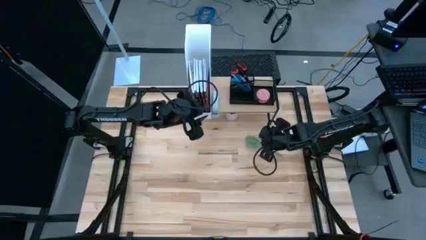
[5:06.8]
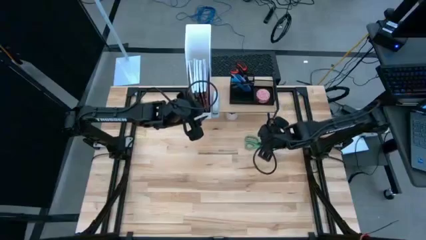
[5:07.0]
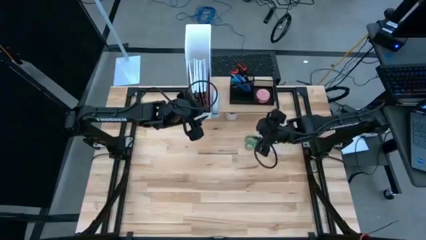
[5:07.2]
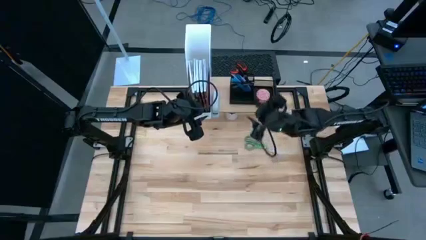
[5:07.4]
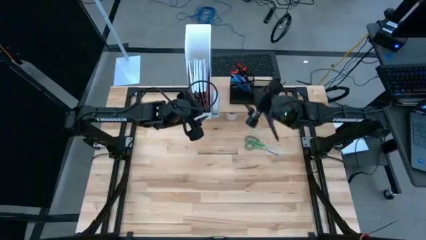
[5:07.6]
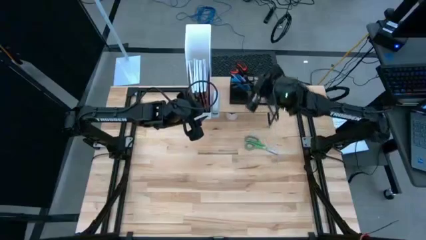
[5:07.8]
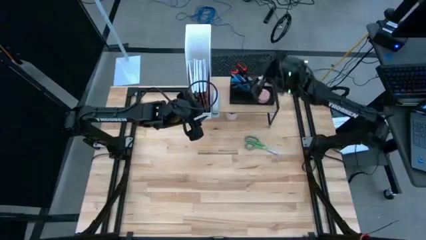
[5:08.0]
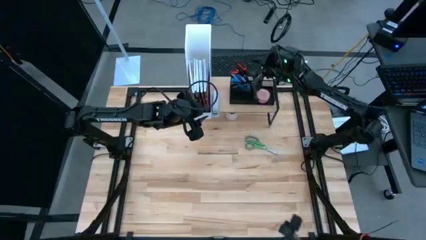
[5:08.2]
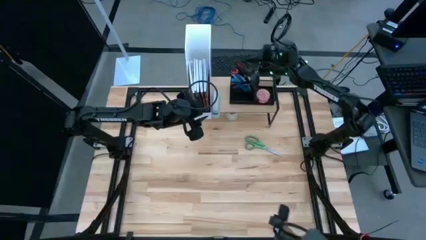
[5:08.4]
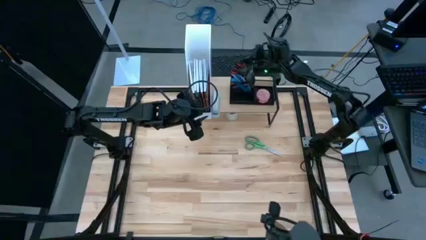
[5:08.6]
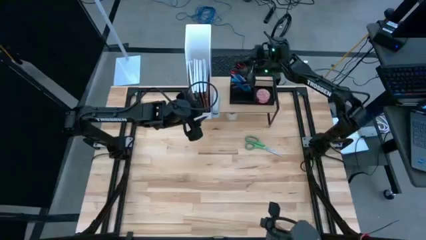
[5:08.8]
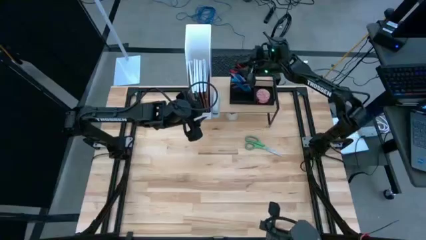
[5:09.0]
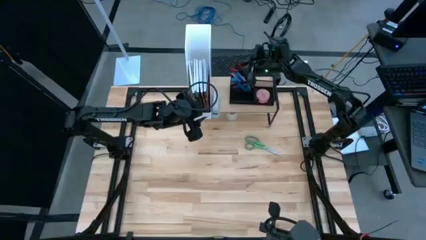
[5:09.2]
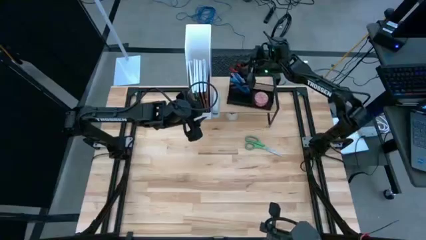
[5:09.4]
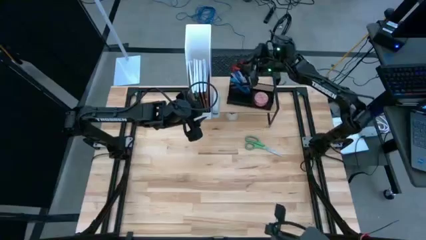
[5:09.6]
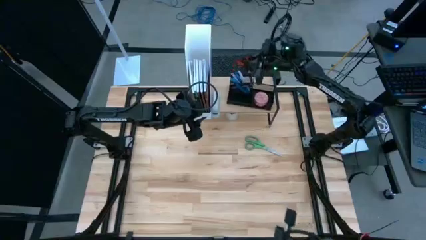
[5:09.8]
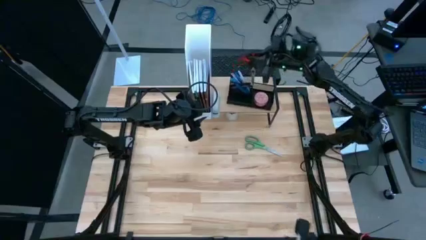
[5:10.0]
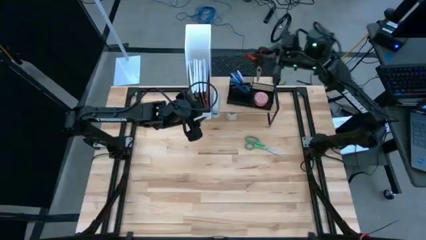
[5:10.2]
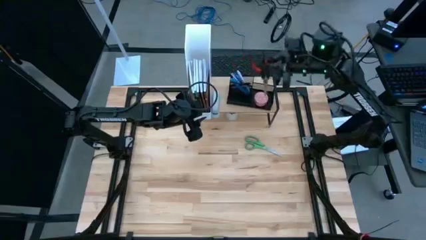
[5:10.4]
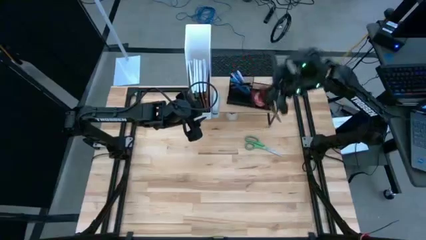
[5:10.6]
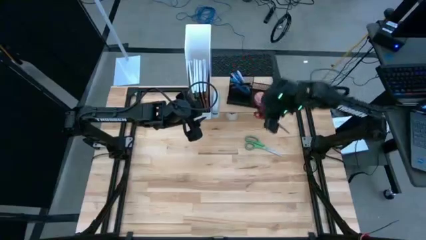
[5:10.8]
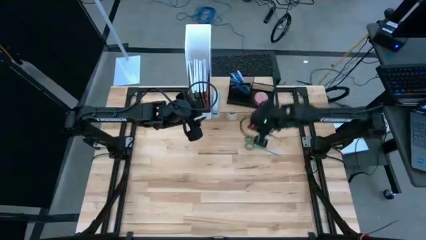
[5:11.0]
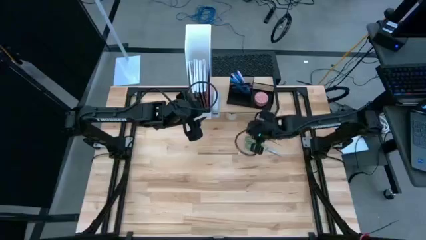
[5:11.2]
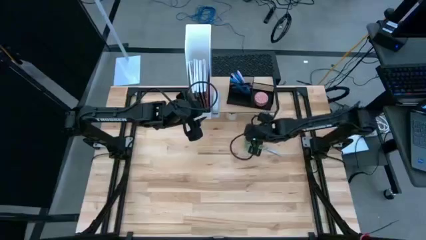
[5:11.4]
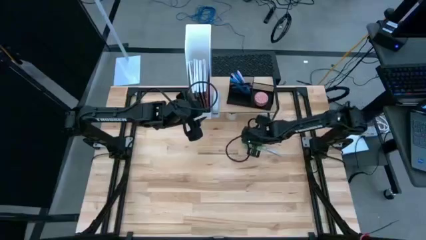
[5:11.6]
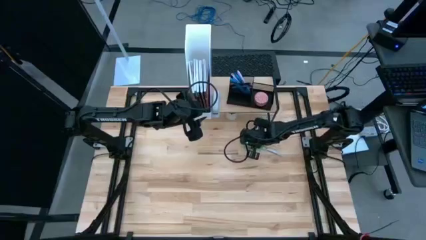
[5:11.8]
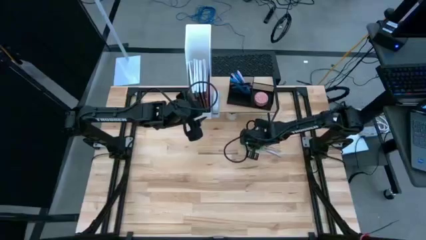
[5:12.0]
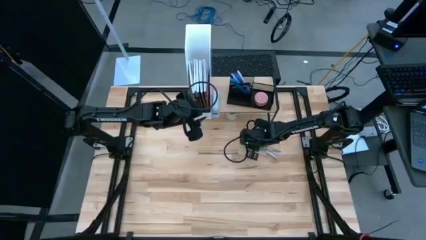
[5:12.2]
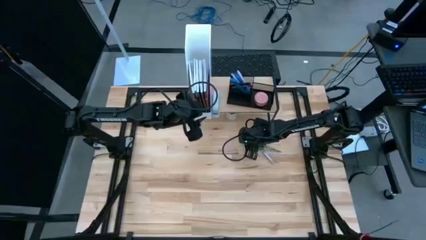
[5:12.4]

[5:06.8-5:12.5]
Task: Stock shelves
Remove the black scissors from the desk organizer on the shelf

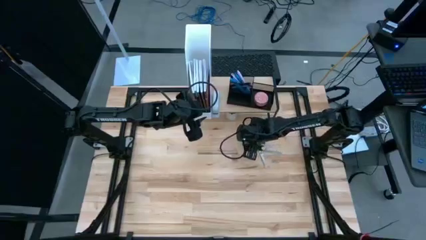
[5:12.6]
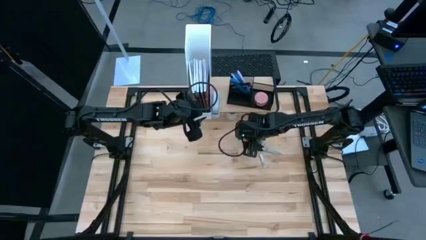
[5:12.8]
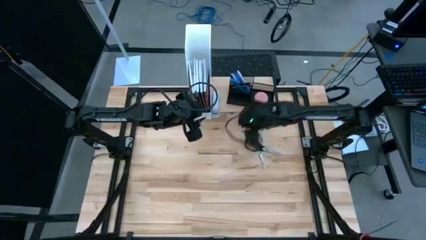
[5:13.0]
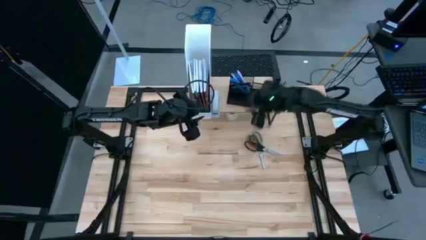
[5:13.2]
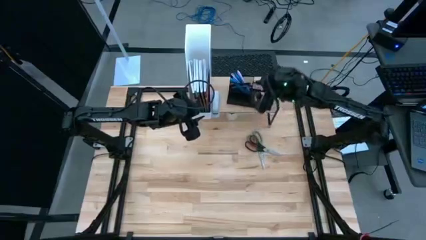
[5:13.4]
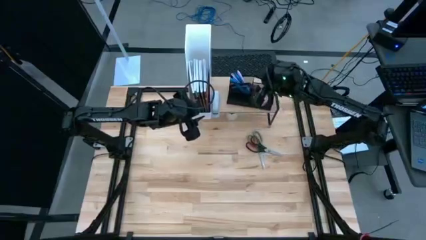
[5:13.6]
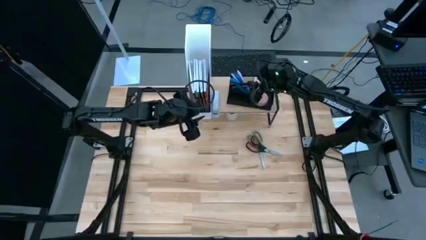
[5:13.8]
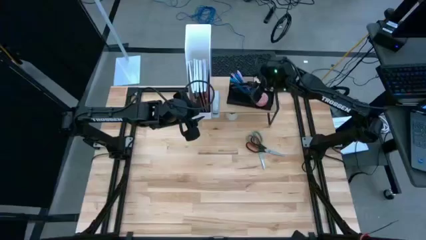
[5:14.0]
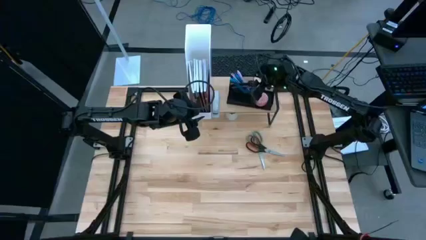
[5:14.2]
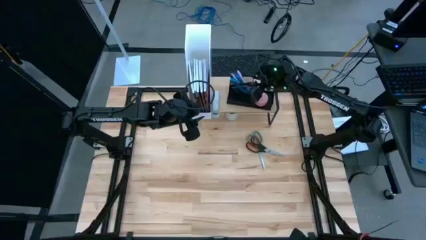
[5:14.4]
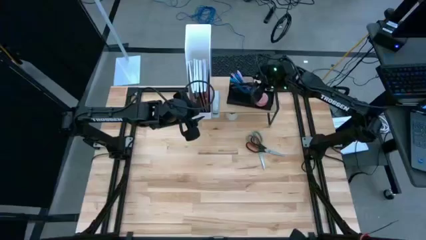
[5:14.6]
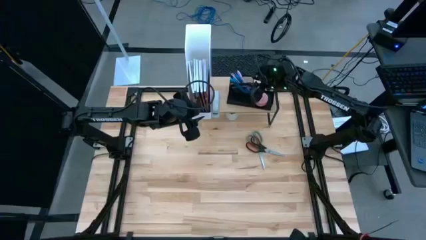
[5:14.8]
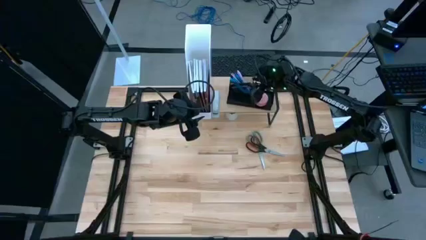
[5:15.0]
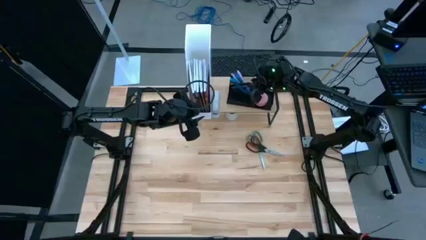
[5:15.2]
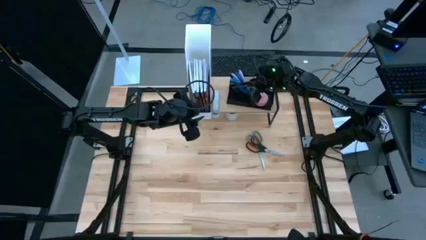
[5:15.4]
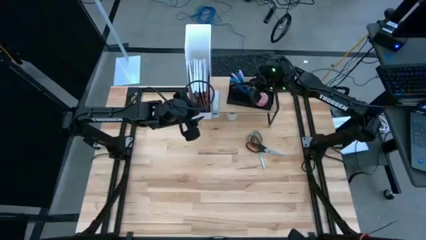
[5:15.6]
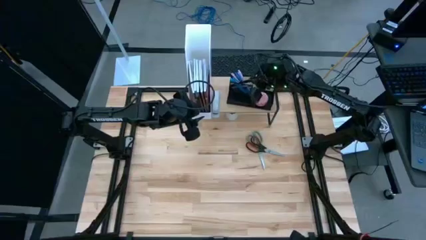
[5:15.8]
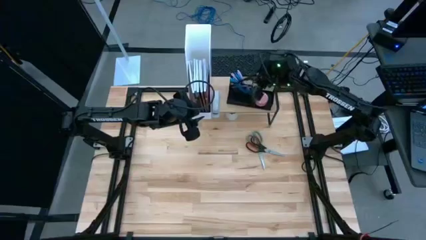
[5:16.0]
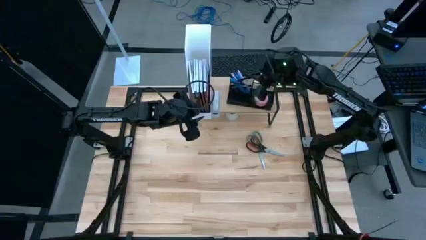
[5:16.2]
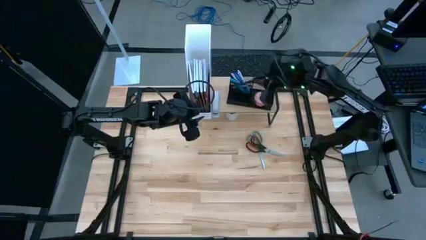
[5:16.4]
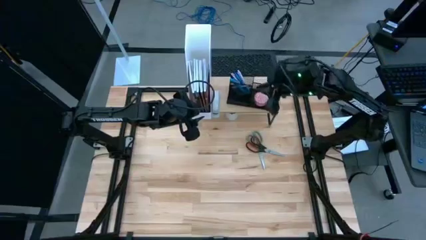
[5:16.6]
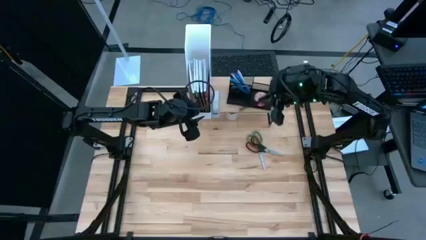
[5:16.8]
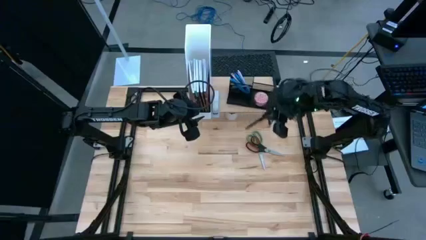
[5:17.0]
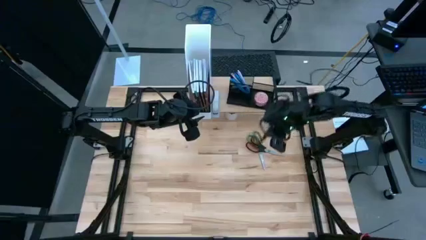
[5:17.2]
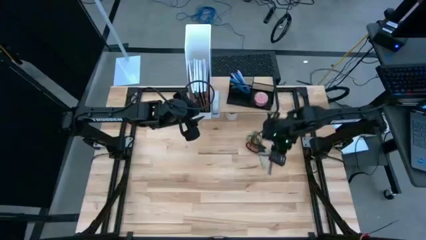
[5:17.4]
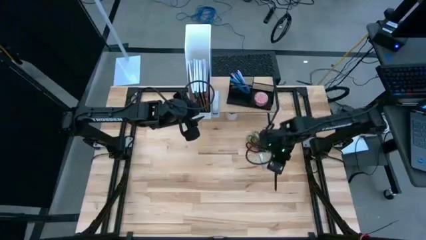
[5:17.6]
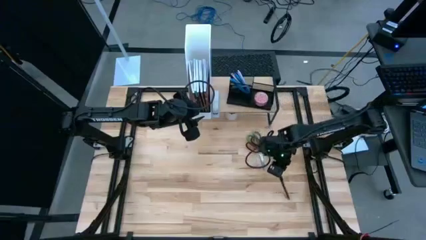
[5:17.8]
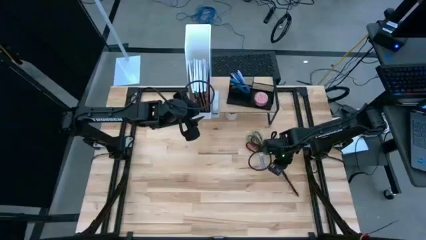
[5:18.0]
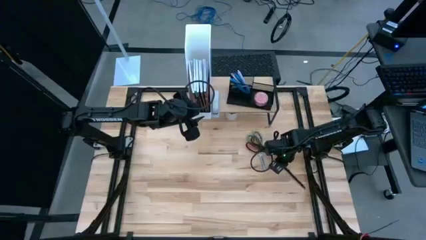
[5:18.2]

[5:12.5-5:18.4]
Remove the black pen from the desk organizer on the shelf

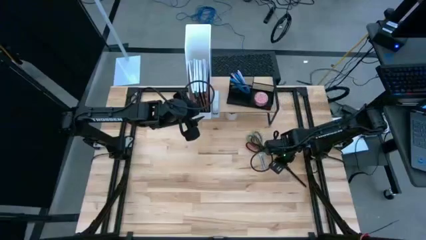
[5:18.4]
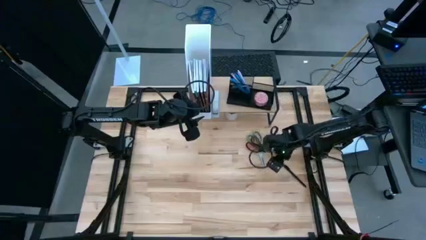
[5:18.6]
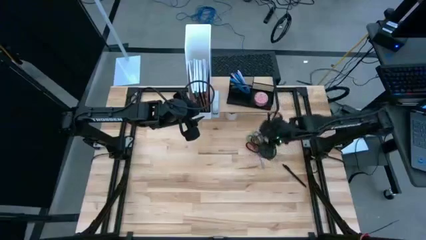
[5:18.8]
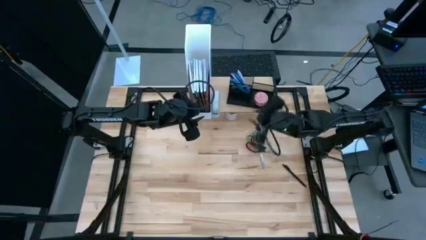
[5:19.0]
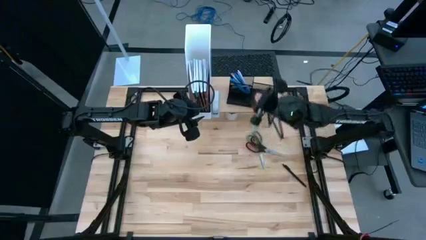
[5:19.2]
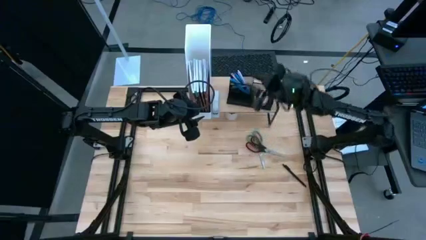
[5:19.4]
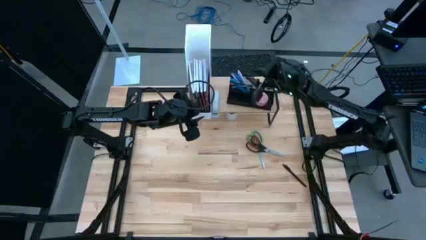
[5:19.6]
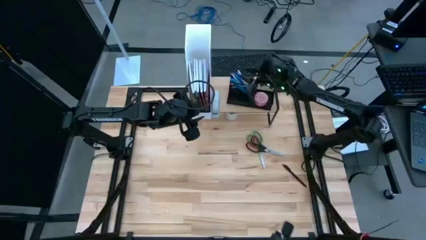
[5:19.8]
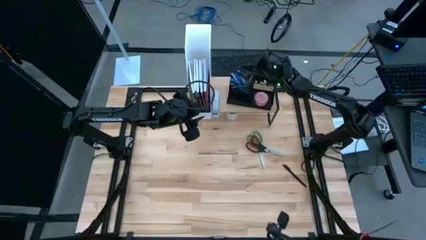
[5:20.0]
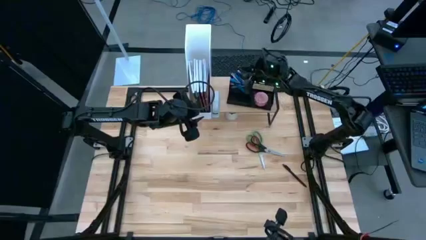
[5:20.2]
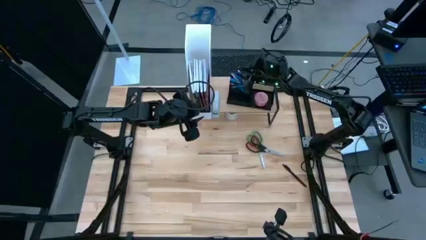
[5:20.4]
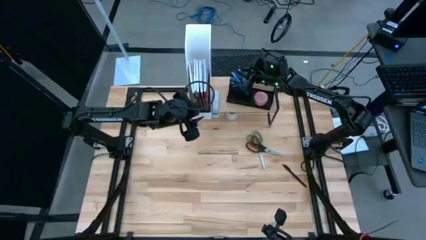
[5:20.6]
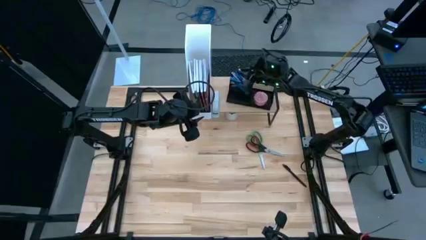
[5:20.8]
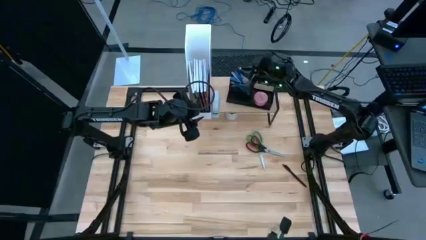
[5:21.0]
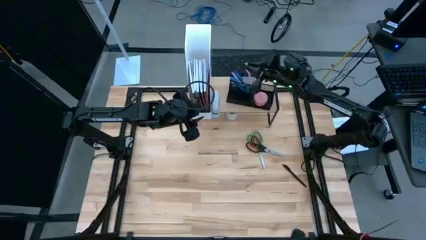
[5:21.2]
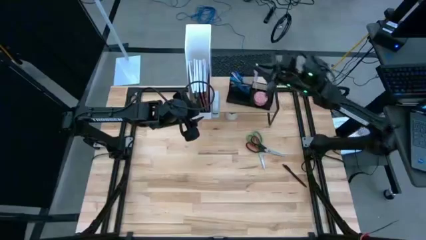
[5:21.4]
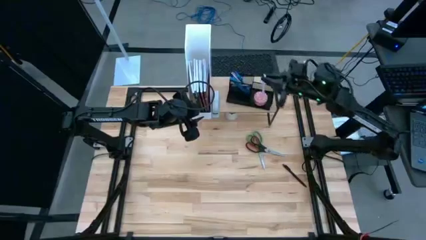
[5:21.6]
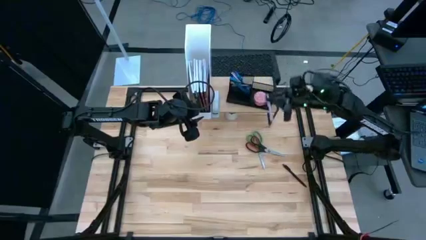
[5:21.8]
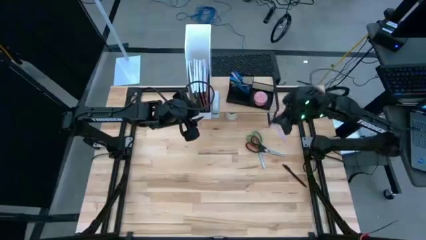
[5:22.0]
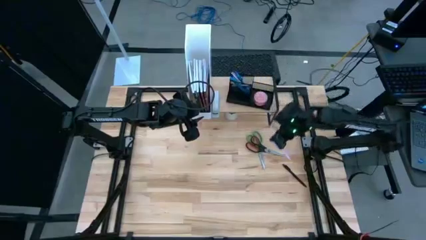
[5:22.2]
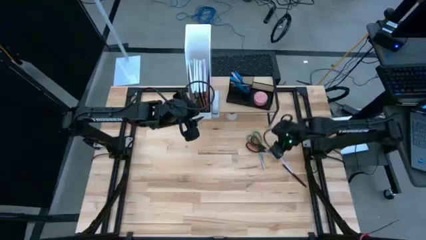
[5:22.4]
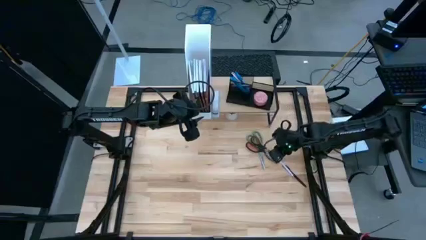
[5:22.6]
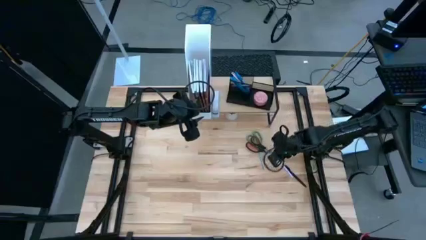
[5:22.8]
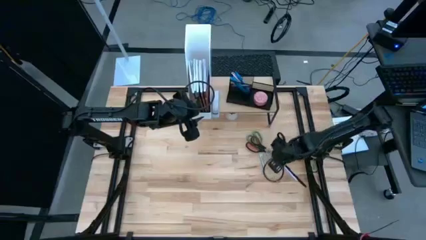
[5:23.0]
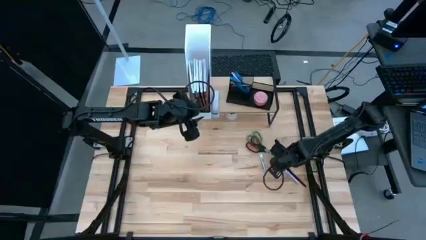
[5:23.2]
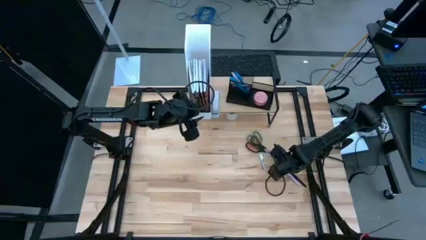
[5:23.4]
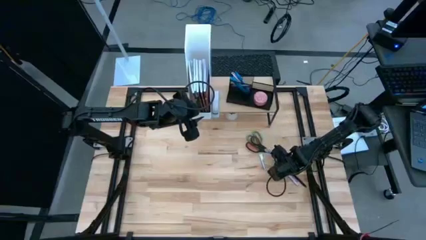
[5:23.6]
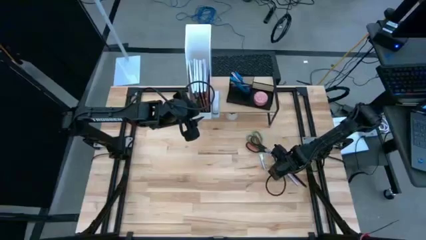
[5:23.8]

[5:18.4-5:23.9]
Remove the purple pen from the desk organizer on the shelf
